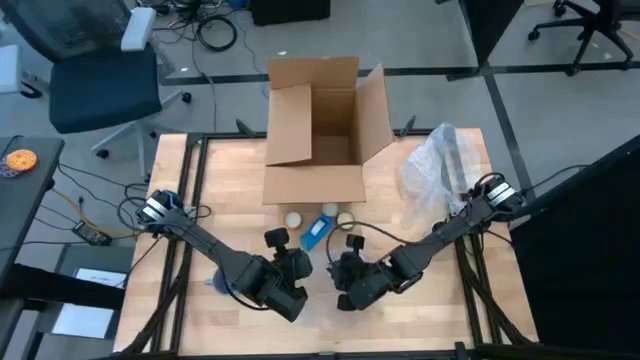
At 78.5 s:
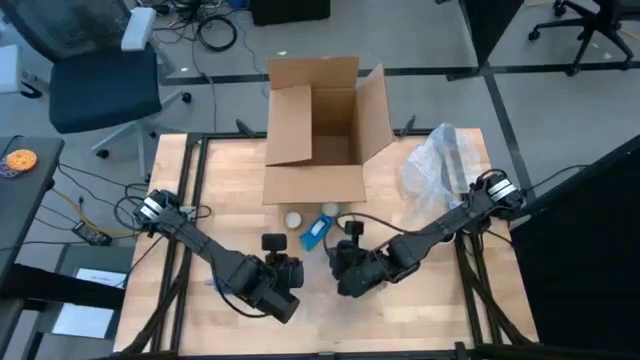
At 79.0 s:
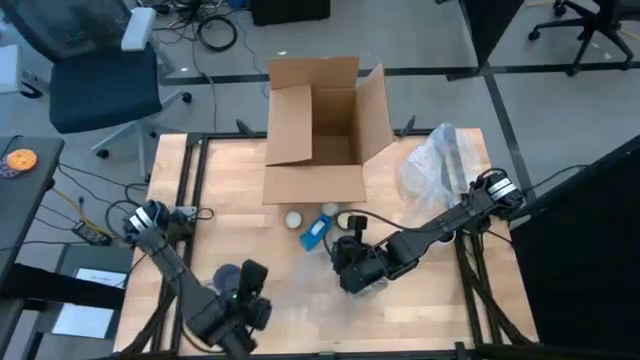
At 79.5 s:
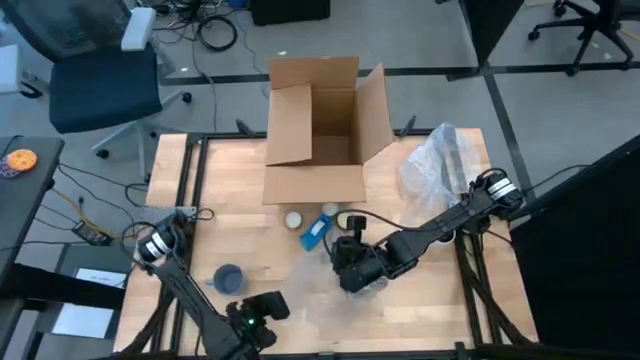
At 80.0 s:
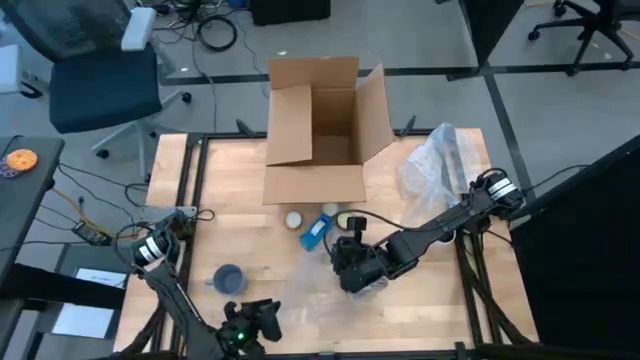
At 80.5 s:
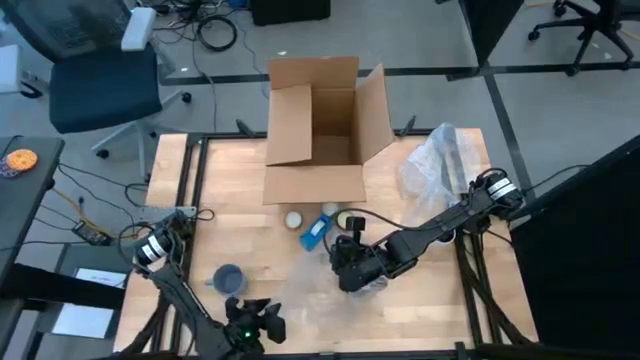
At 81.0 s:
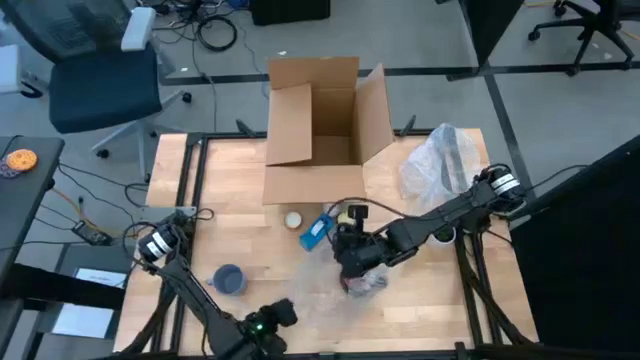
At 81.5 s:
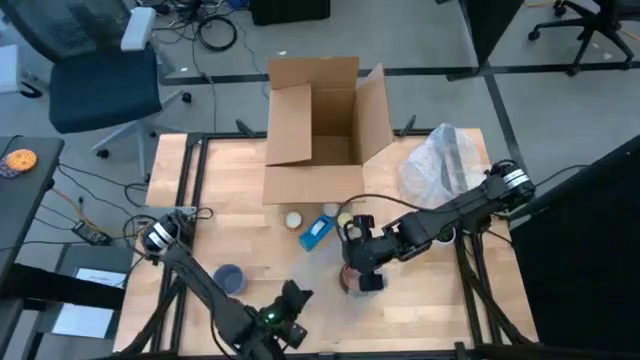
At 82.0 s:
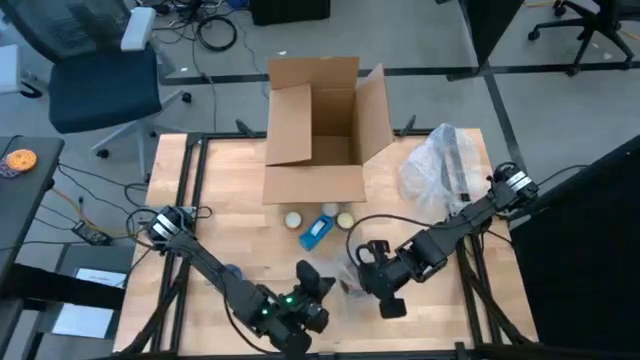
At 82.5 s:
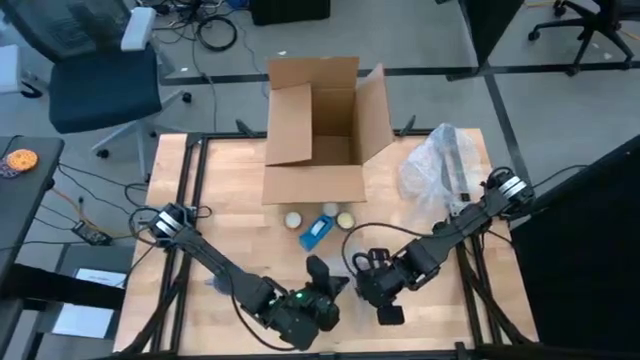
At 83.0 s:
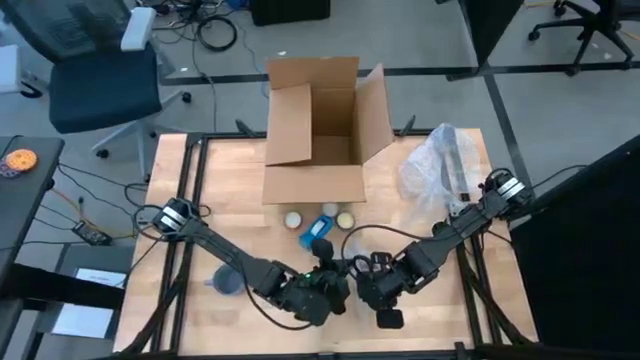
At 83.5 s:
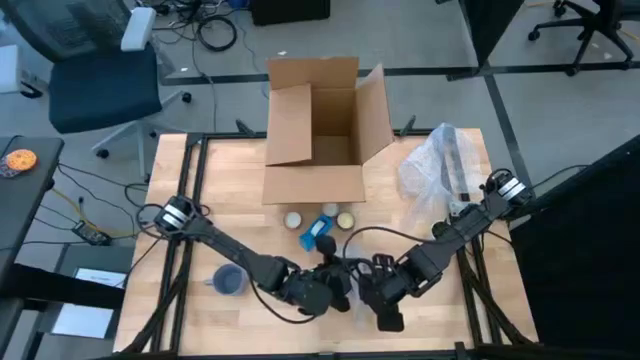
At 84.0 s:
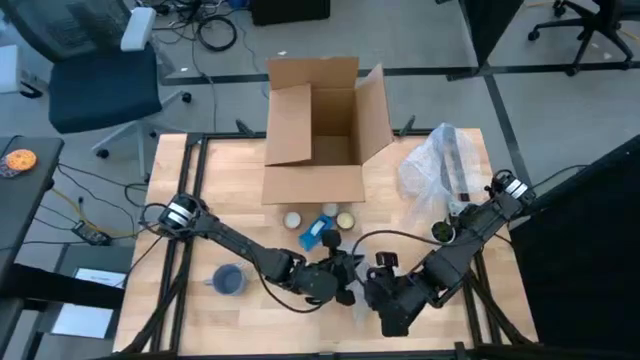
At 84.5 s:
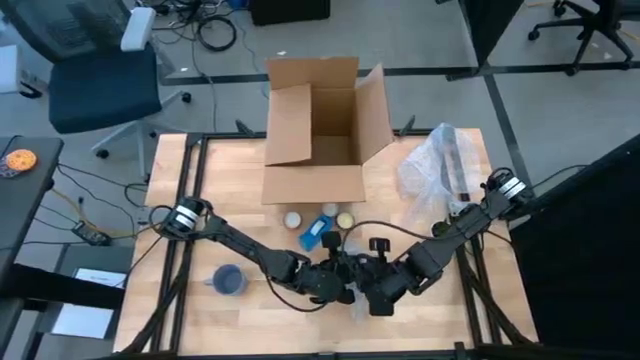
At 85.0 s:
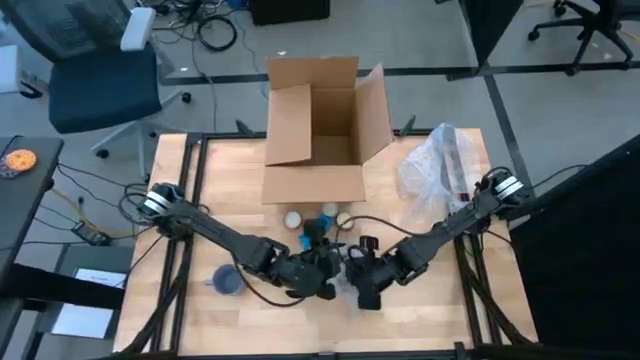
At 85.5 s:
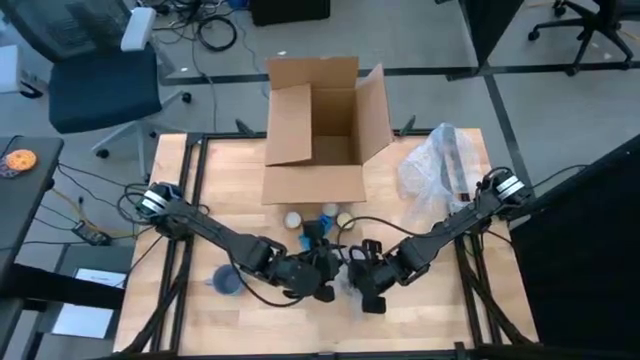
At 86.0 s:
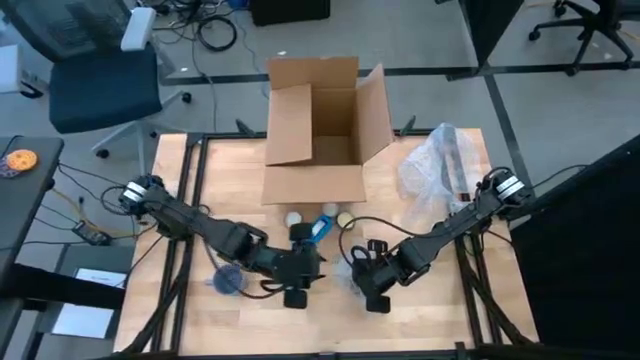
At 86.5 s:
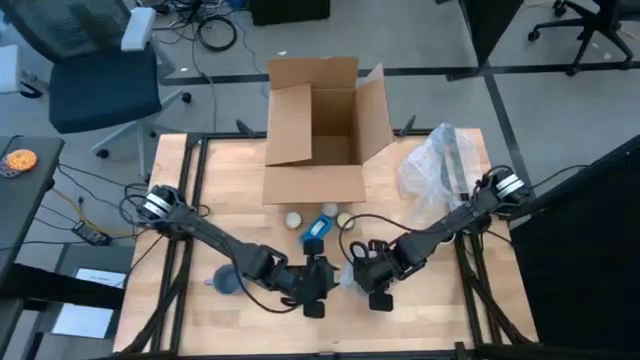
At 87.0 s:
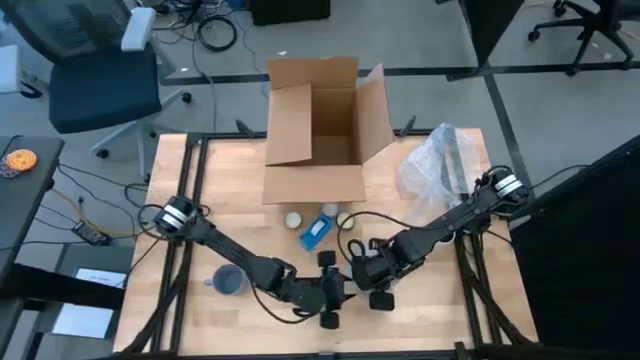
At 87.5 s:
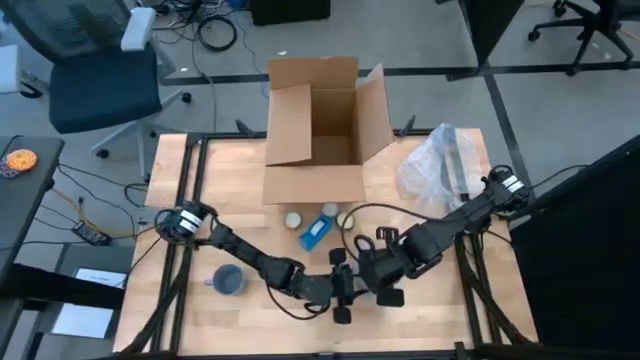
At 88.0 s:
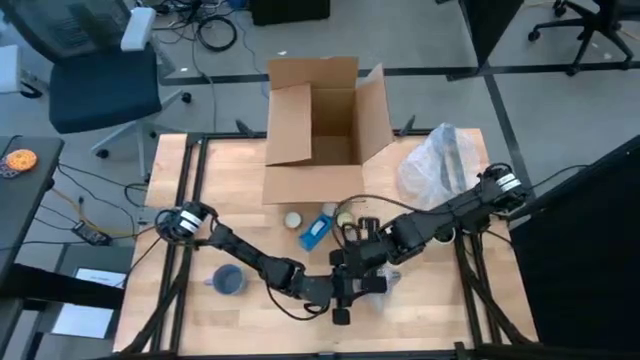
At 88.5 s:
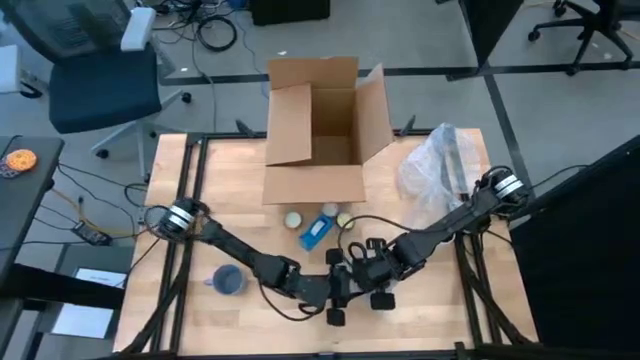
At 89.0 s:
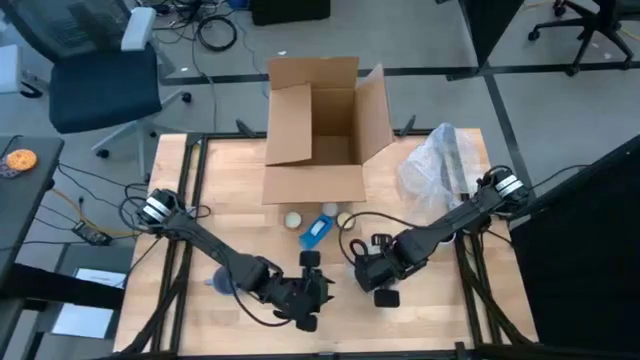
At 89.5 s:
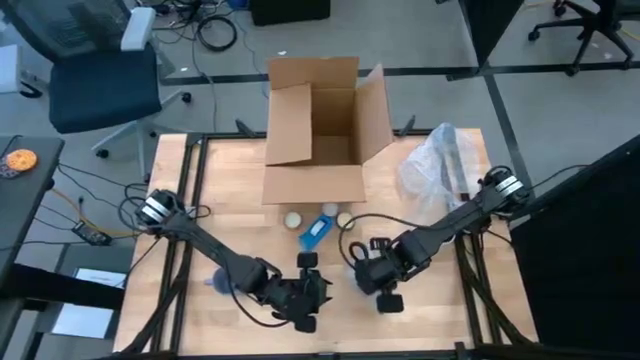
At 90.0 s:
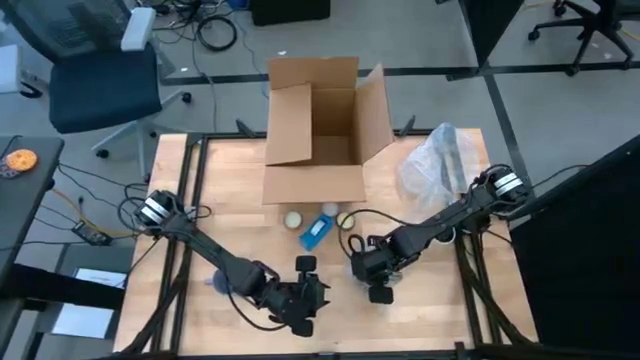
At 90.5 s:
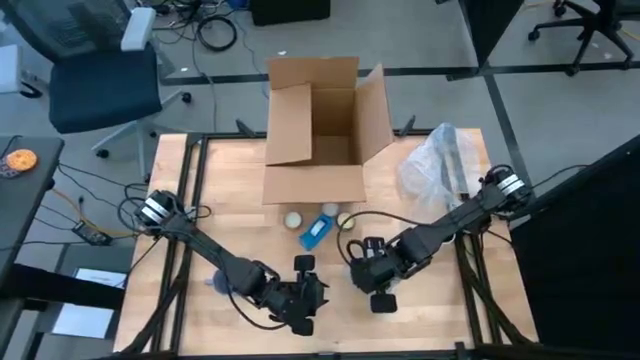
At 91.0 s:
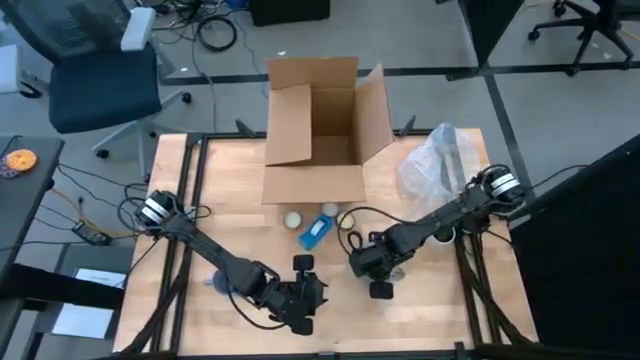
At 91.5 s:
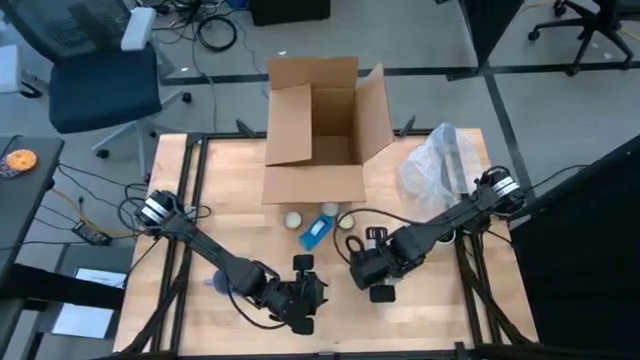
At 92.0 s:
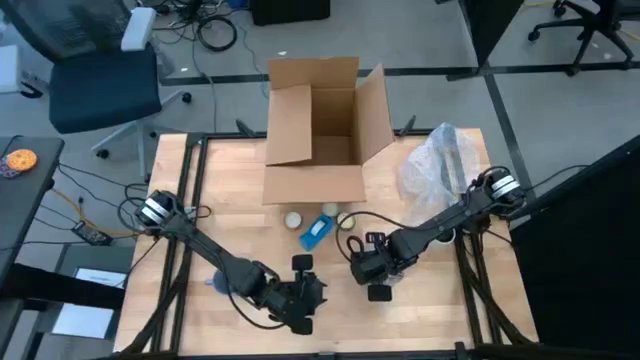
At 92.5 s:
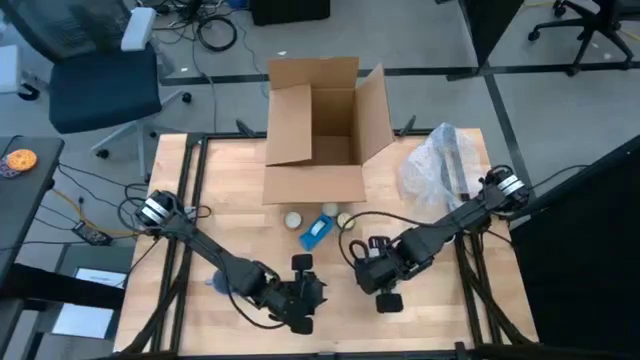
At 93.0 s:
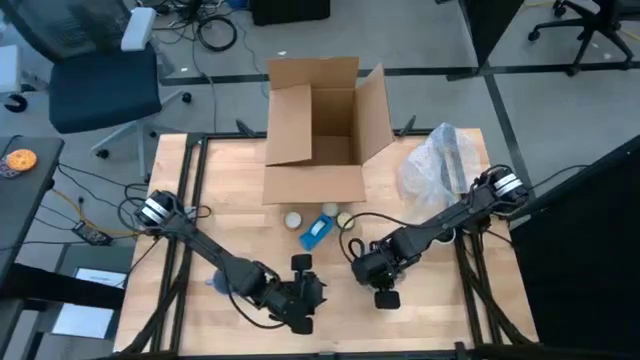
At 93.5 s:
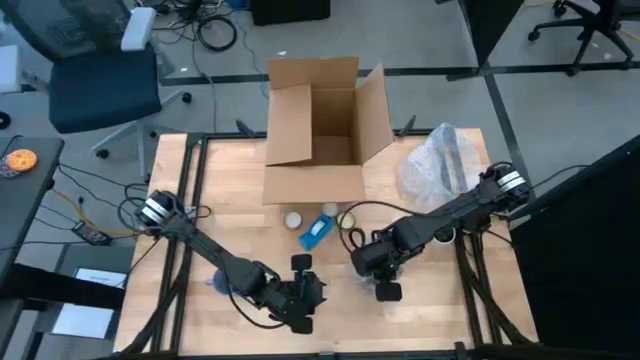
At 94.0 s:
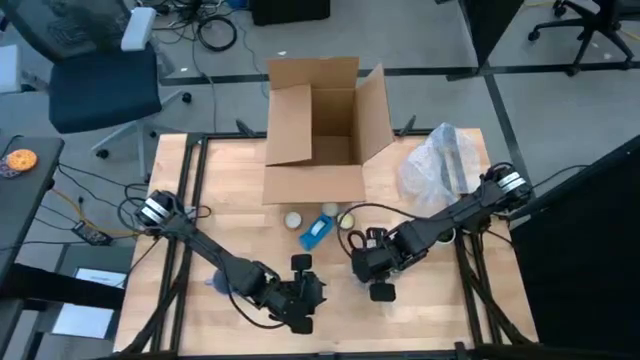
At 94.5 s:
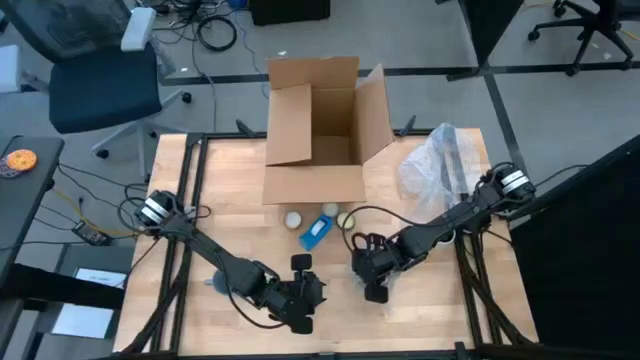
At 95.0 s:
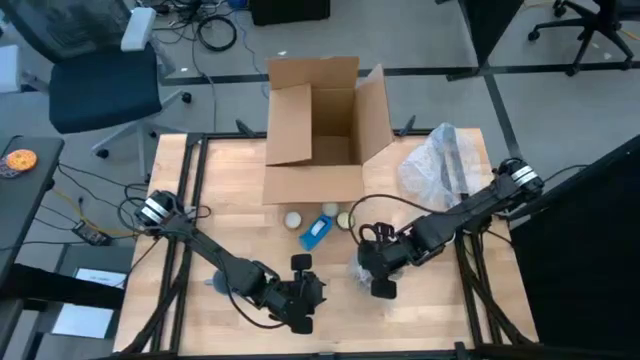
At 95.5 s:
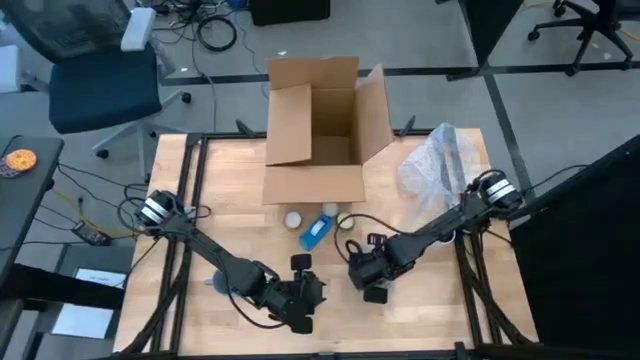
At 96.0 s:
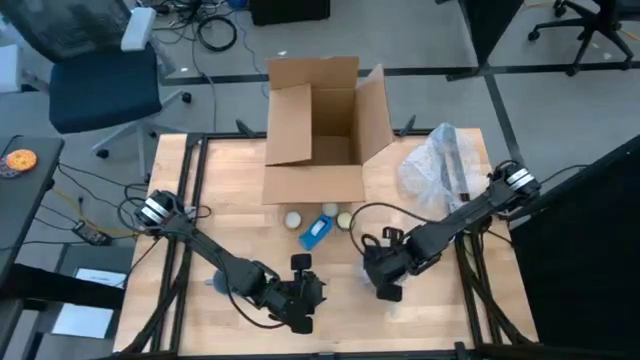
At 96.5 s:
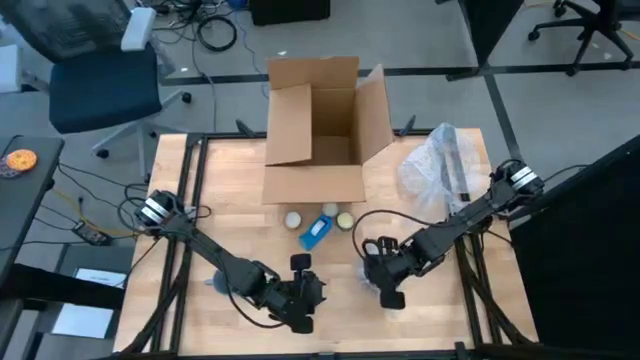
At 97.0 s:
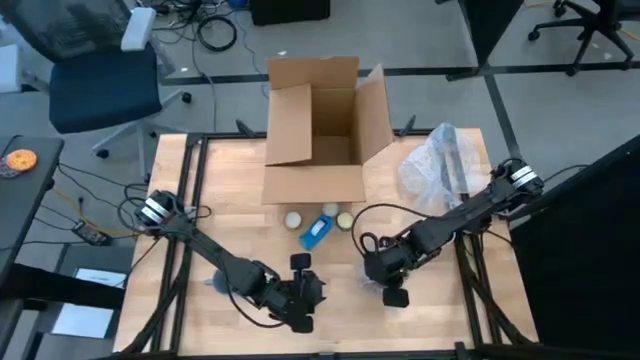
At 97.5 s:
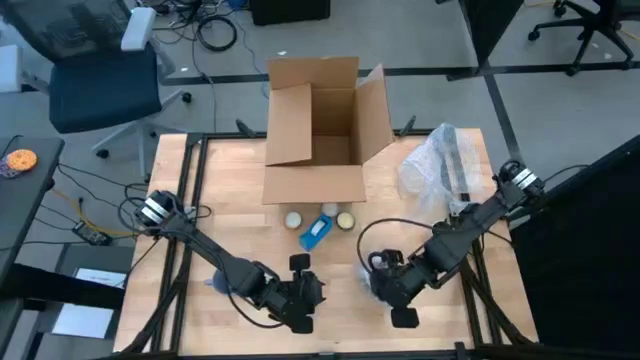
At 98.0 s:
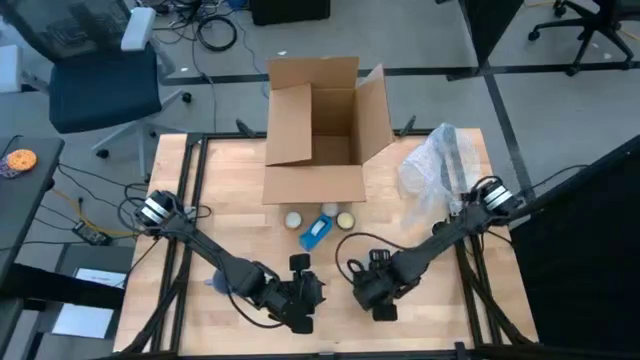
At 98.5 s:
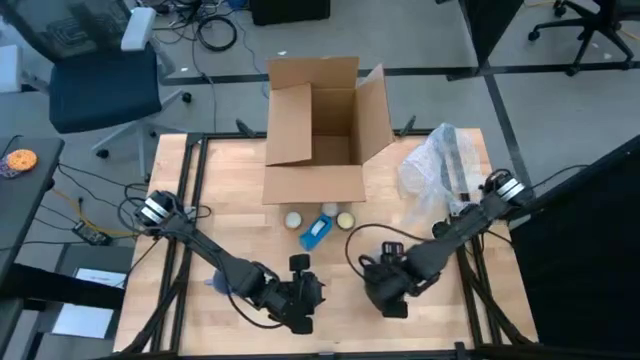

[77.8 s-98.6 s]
Task: wrap mug
Wrap the black mug with the bubble wrap
